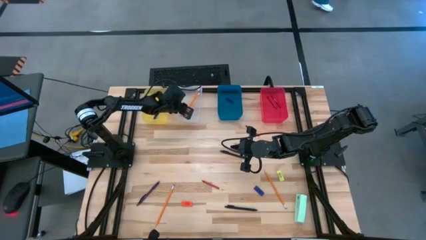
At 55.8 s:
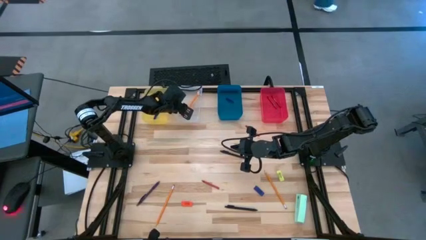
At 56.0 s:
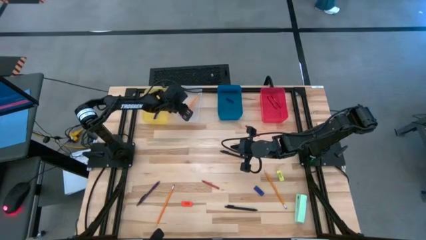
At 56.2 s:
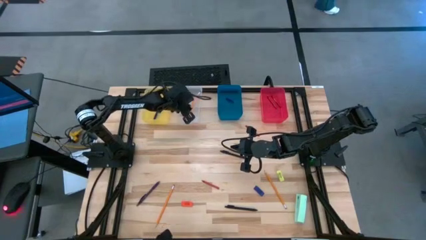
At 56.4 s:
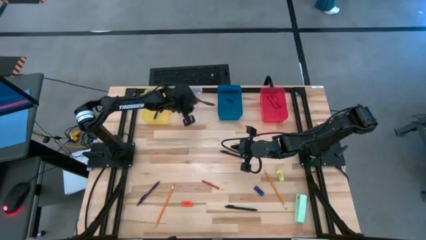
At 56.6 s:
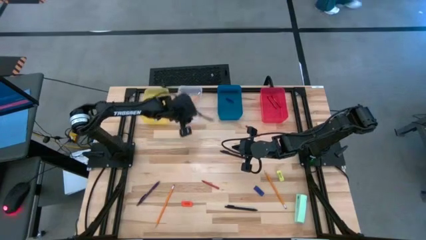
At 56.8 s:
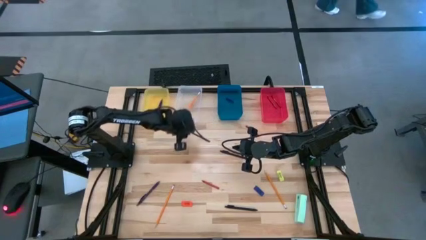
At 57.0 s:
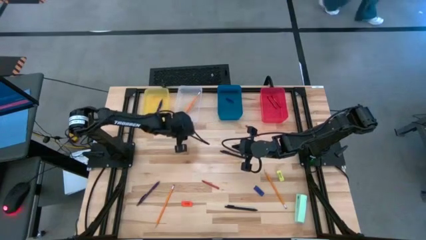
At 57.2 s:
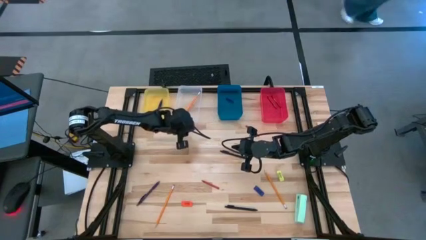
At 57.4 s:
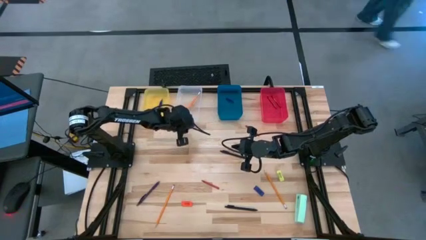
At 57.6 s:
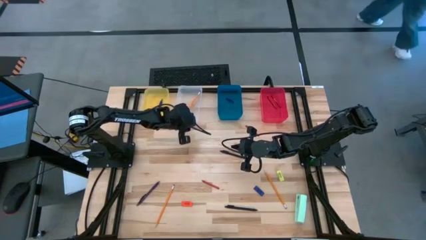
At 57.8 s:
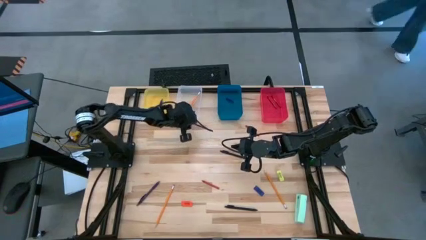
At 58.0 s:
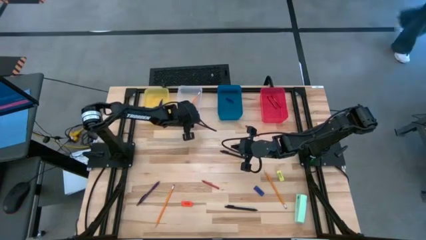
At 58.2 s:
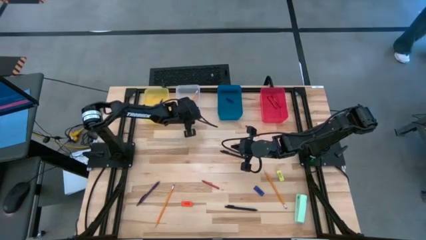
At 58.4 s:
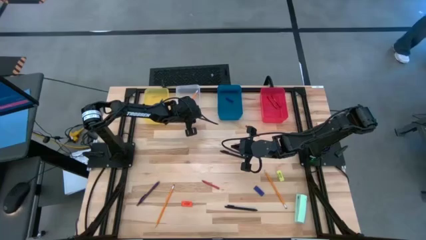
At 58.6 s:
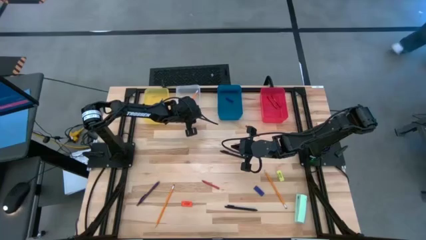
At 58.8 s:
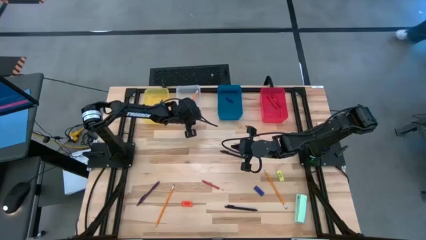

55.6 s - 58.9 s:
Task: Sort crayons/erasers/pens/pencils in bins
Adjust the transparent bin on the table

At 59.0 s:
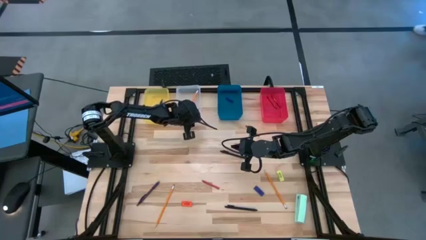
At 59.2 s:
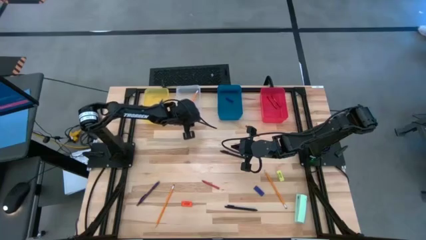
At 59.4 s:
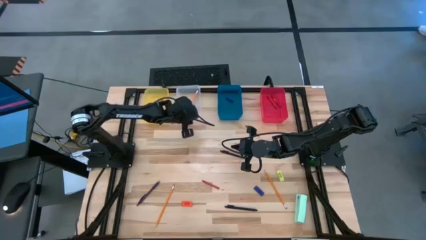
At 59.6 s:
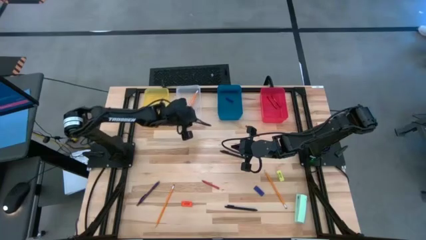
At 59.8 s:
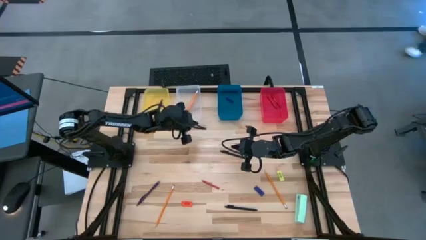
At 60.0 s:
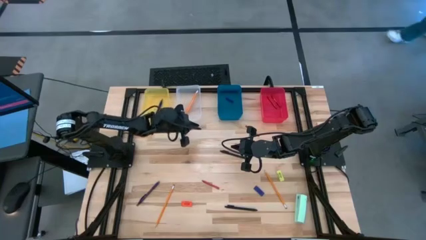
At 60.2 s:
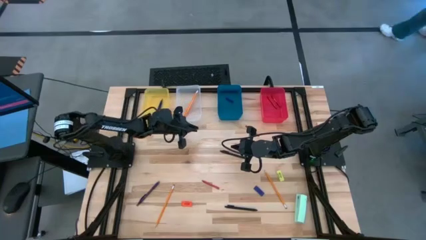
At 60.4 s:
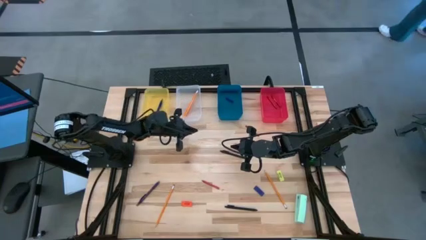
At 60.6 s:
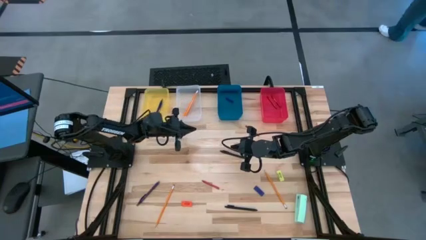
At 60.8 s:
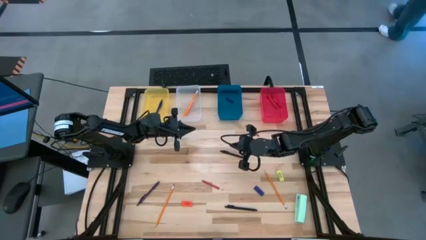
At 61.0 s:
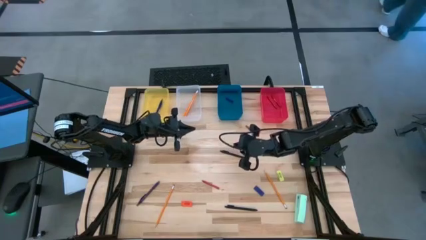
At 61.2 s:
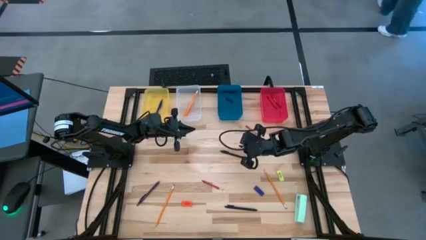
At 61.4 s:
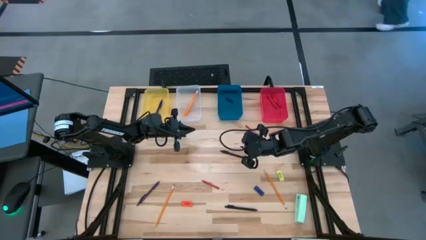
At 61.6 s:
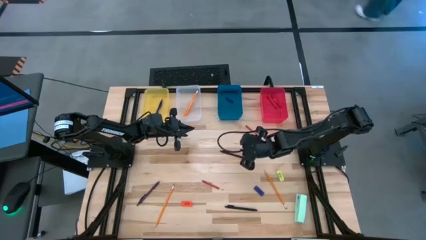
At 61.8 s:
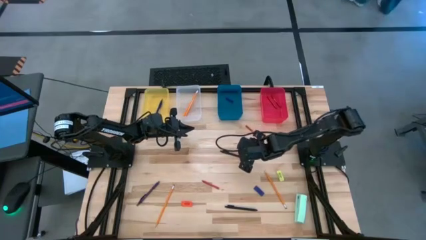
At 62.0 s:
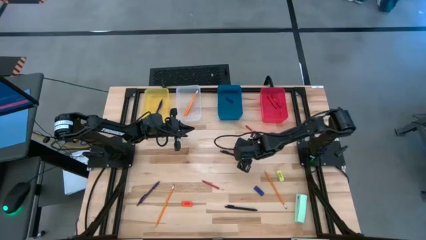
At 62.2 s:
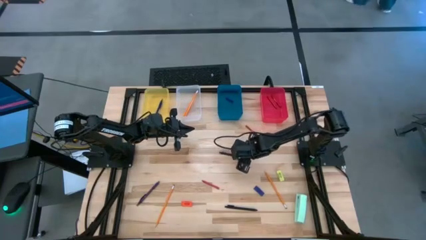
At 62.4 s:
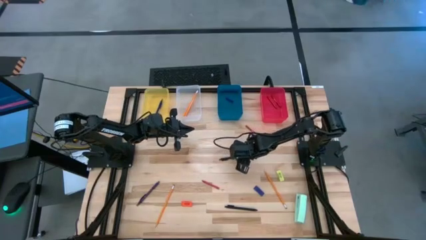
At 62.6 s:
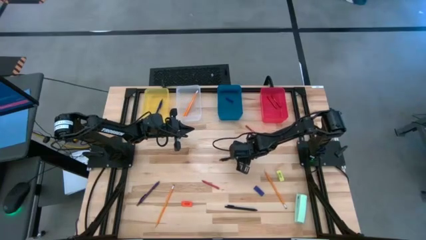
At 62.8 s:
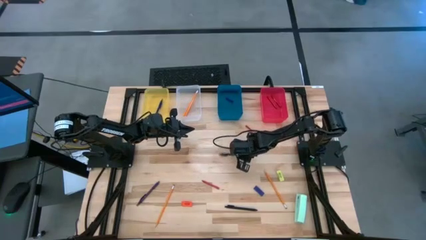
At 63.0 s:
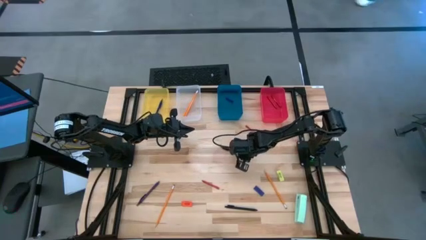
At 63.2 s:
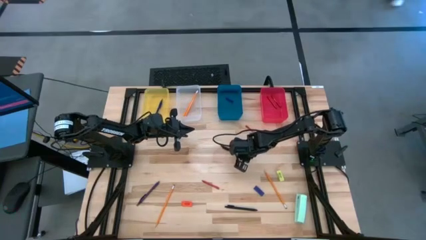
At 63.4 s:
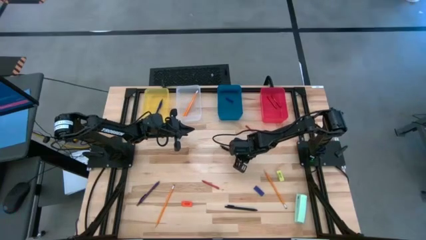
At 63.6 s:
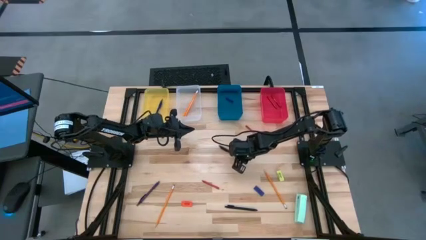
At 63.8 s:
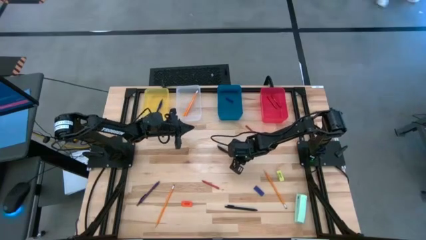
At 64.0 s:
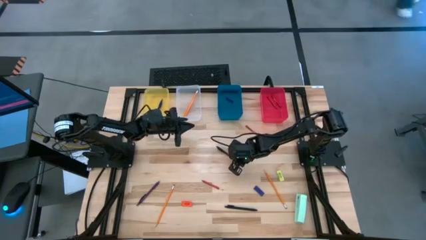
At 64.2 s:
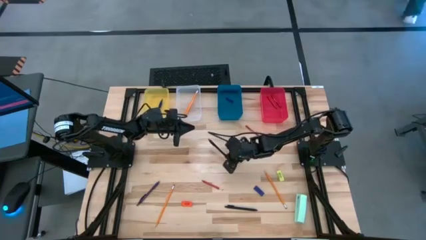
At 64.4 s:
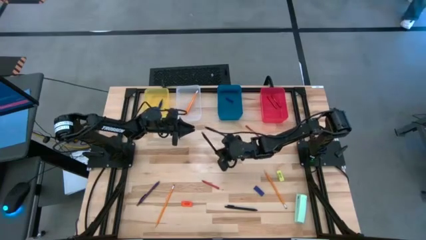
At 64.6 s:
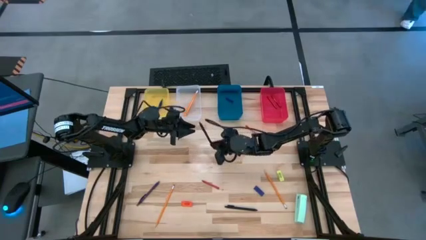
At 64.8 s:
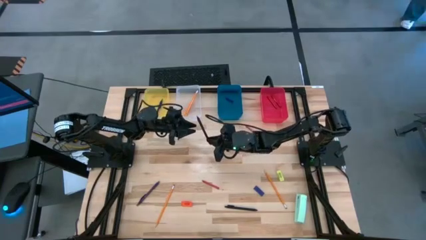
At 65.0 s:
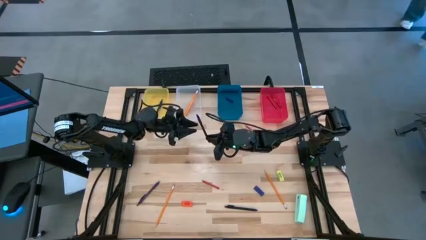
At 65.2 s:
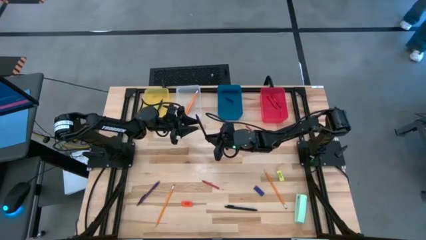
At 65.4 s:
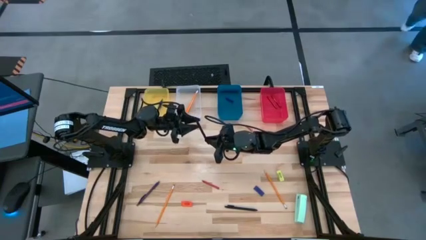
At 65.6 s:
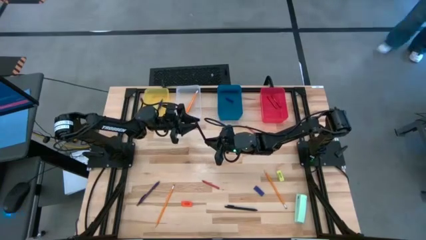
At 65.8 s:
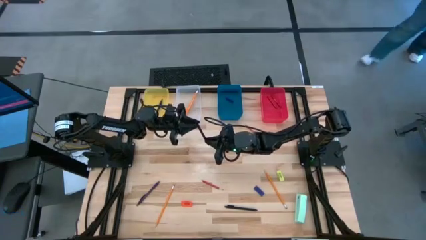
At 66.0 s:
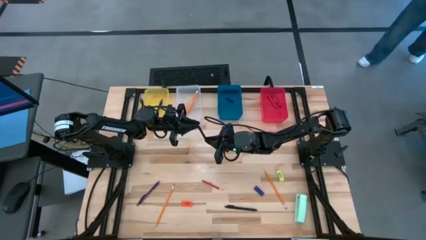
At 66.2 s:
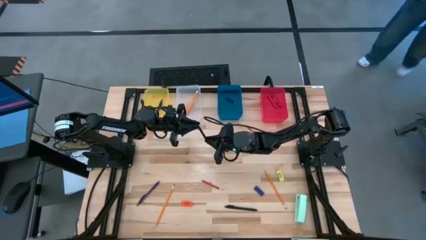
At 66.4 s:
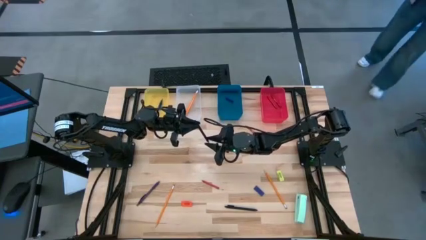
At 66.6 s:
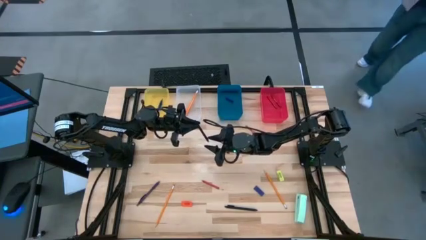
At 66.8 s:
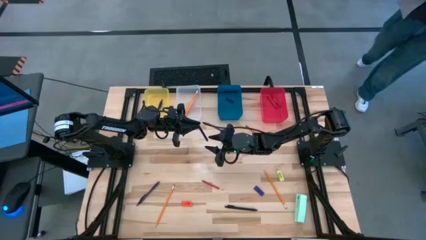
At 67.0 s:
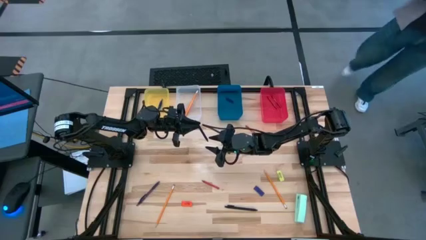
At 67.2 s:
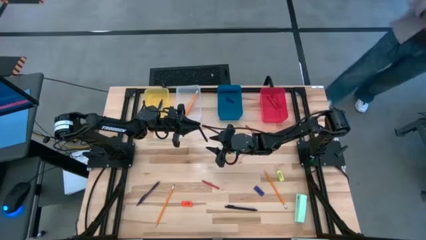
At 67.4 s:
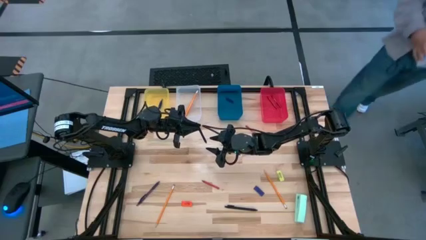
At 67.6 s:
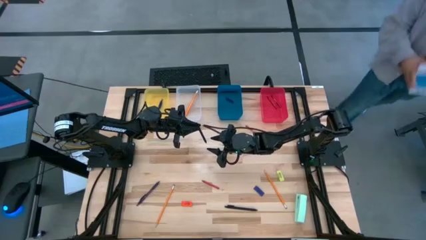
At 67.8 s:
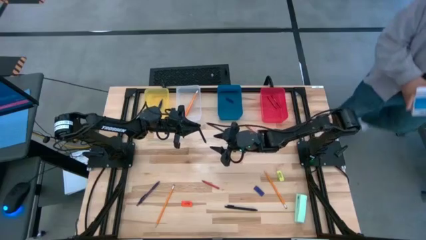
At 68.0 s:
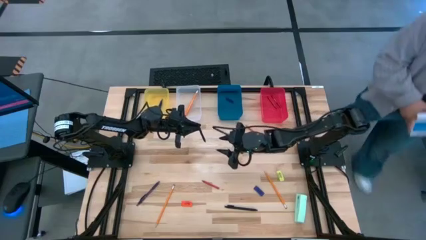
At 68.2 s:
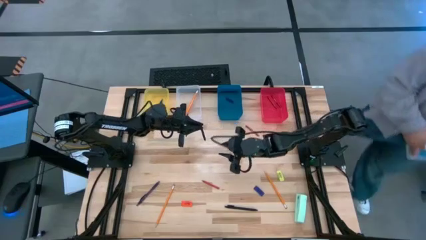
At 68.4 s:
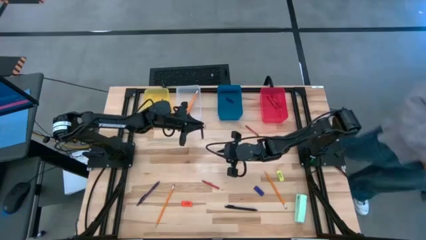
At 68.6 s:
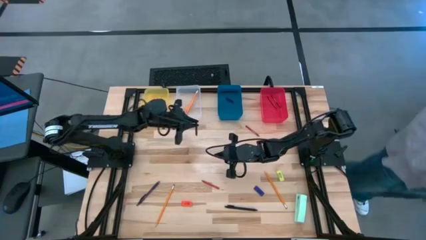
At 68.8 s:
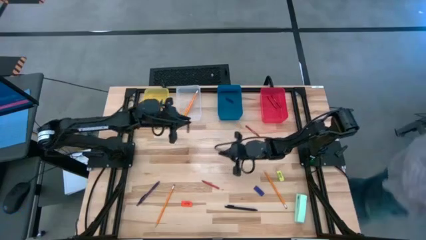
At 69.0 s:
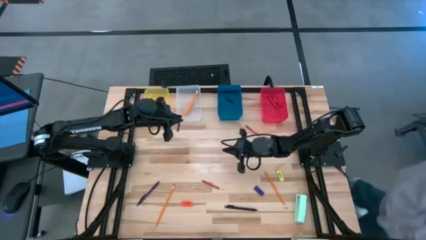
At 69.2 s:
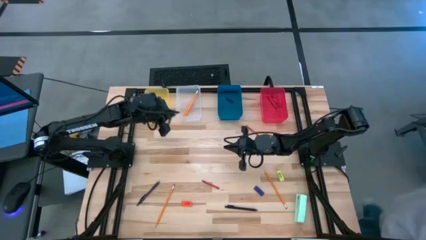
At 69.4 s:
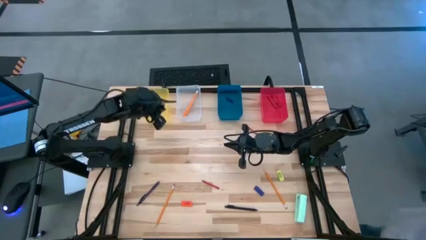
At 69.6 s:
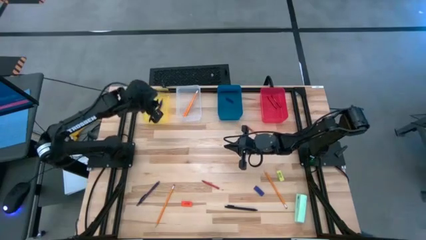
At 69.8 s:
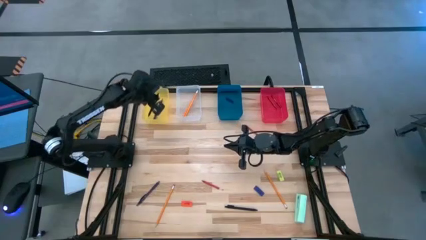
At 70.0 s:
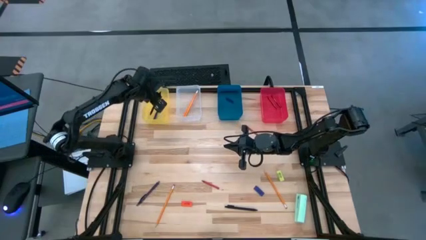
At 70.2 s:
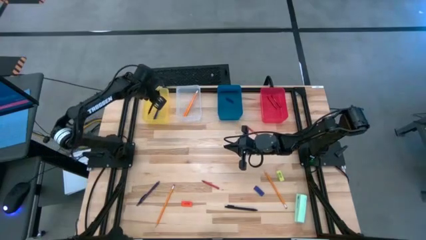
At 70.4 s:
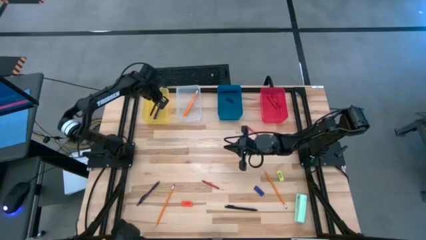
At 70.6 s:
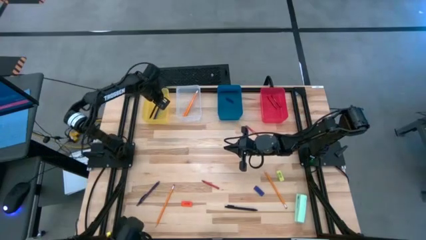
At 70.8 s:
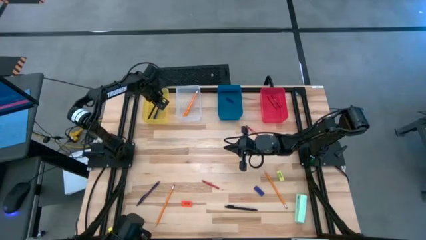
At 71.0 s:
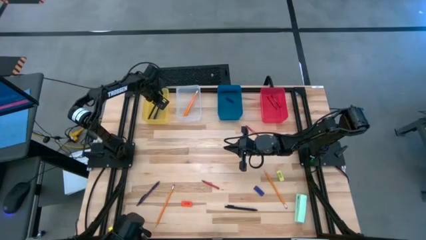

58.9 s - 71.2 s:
Put the black pen into the yellow bin
